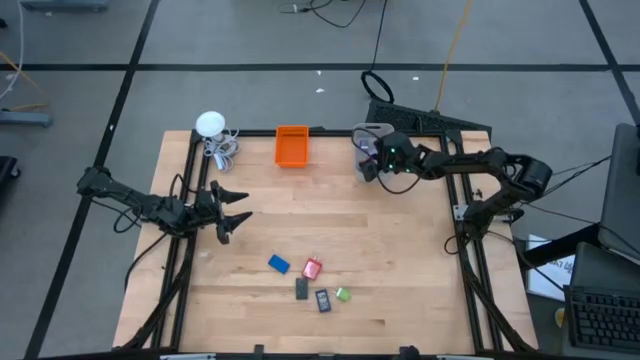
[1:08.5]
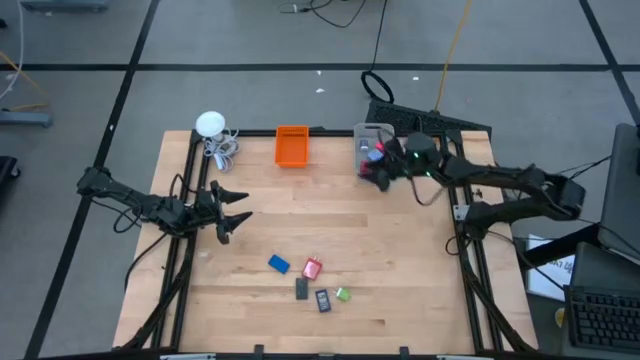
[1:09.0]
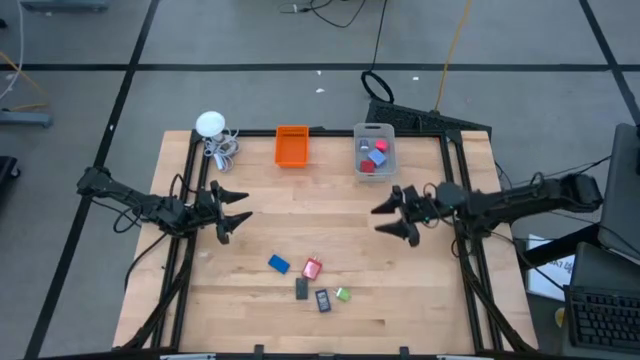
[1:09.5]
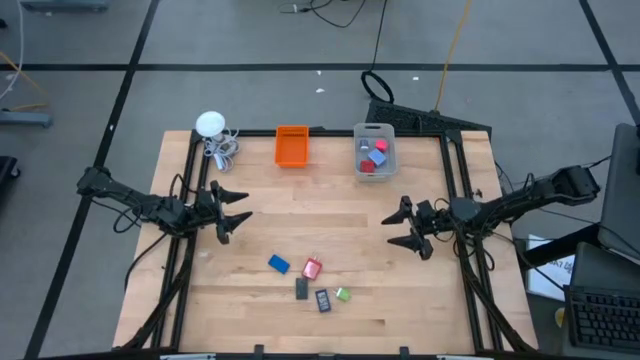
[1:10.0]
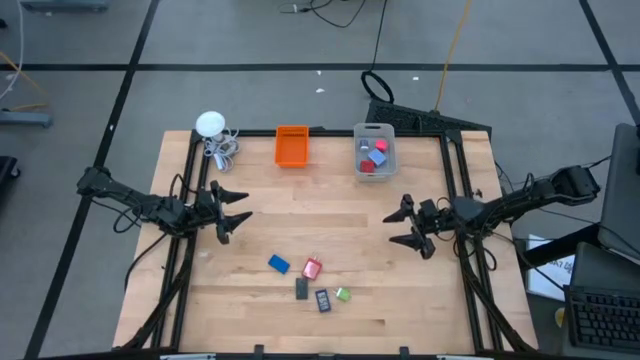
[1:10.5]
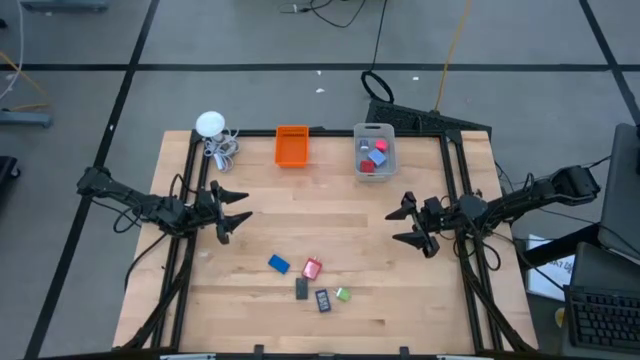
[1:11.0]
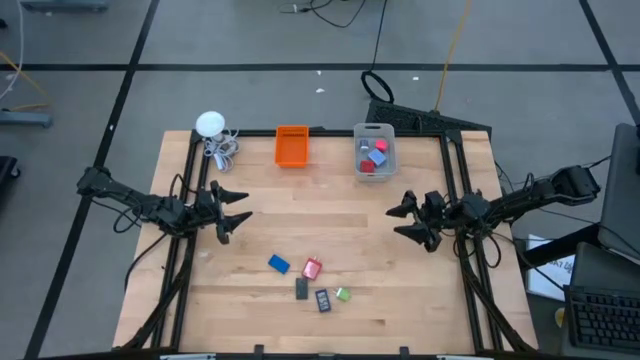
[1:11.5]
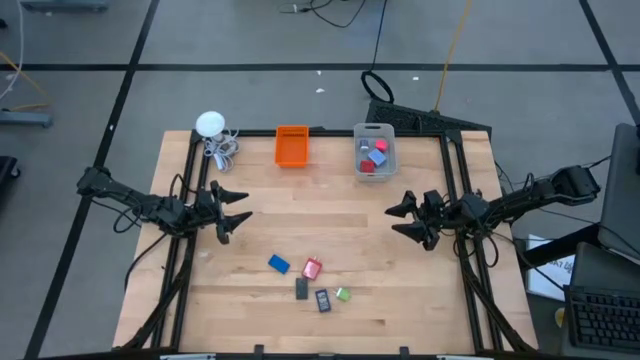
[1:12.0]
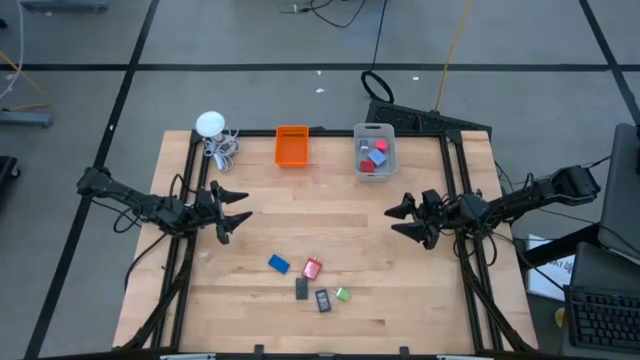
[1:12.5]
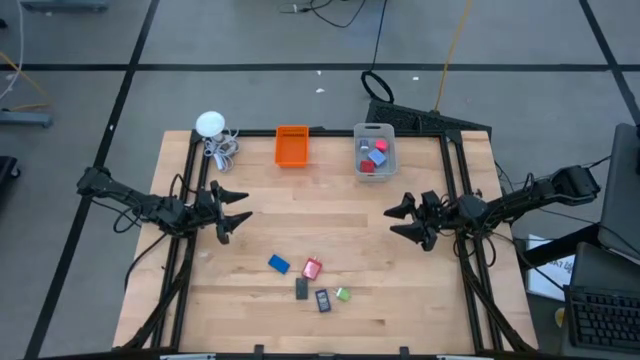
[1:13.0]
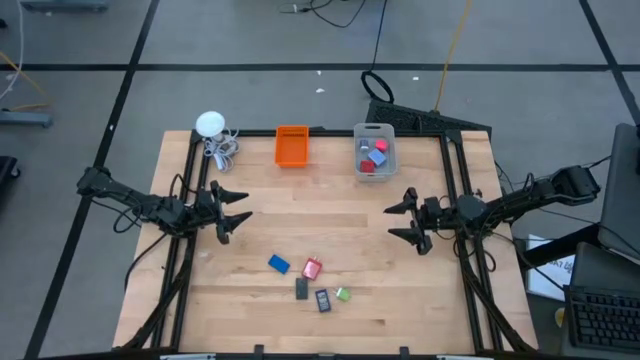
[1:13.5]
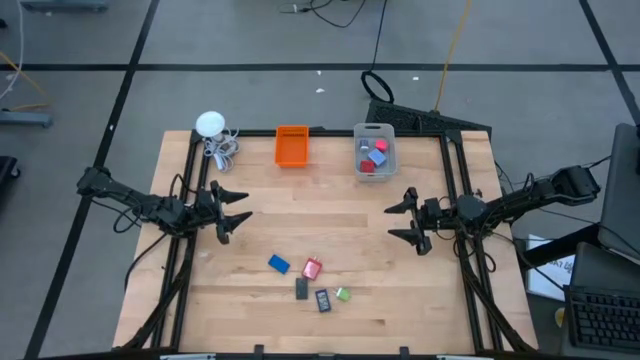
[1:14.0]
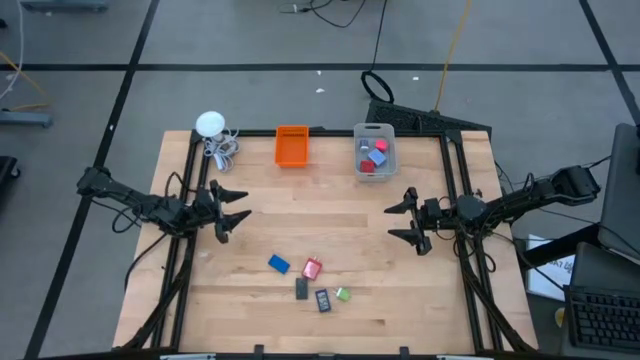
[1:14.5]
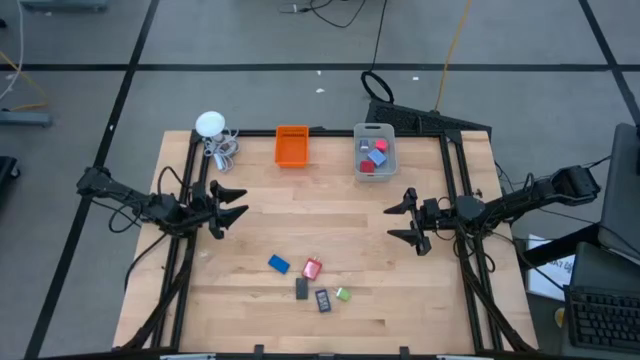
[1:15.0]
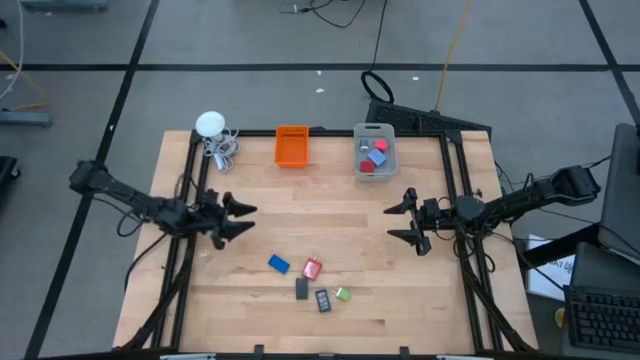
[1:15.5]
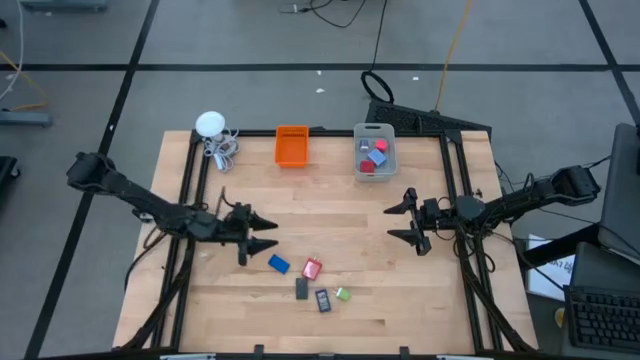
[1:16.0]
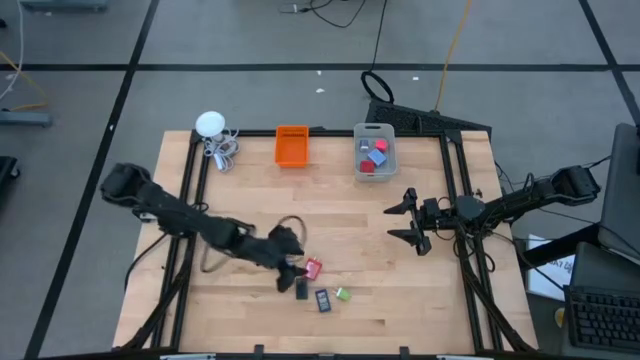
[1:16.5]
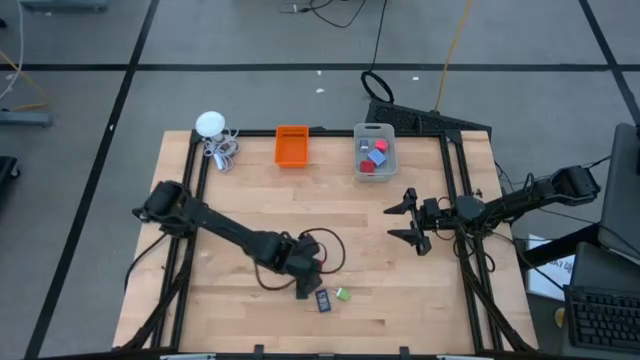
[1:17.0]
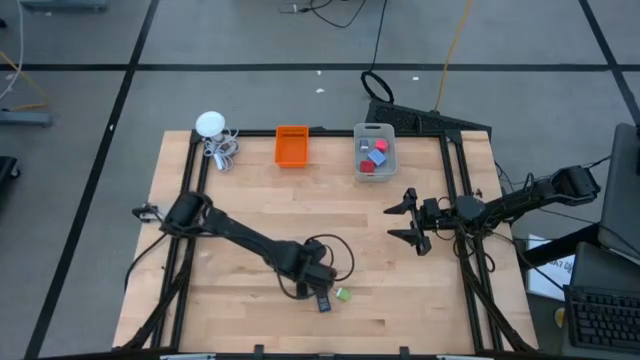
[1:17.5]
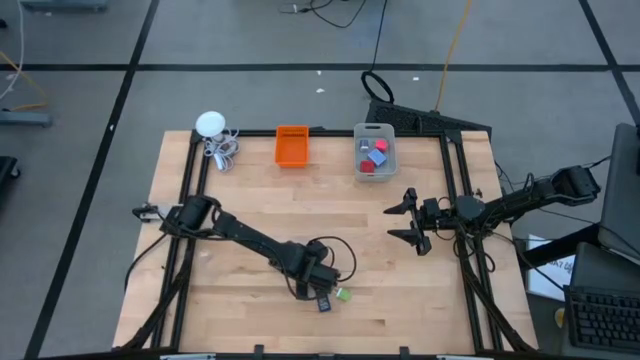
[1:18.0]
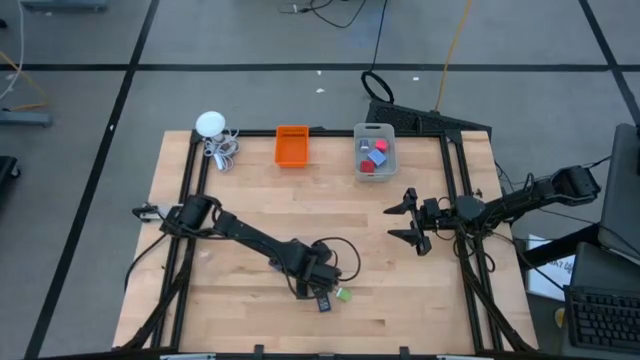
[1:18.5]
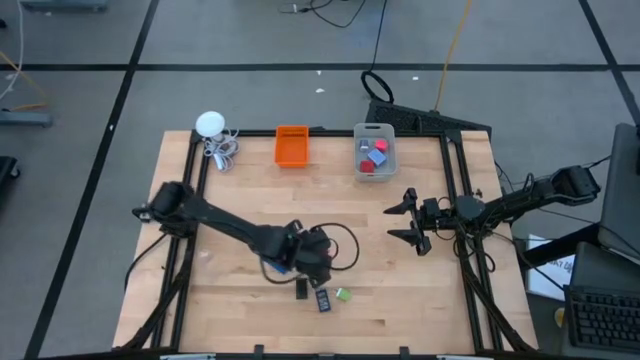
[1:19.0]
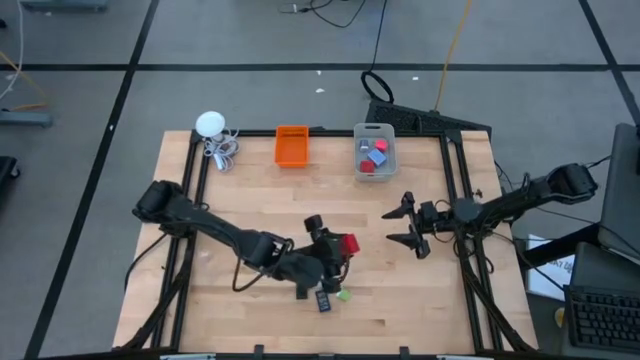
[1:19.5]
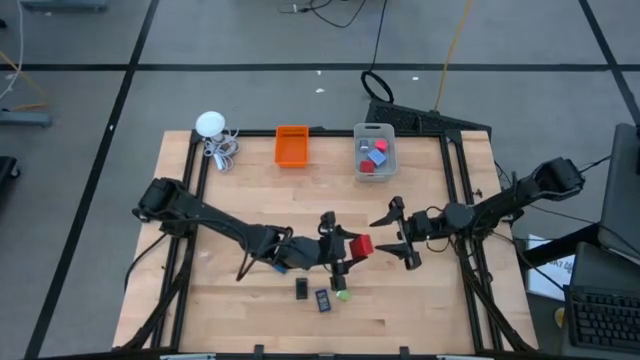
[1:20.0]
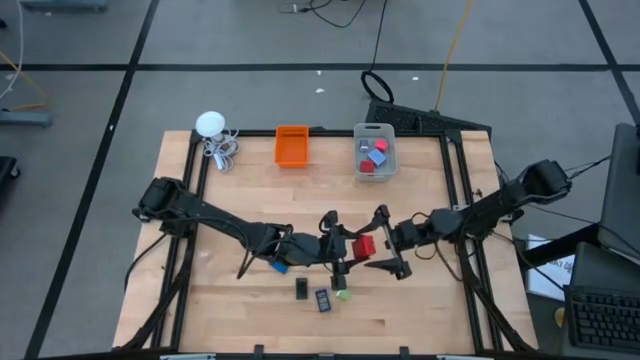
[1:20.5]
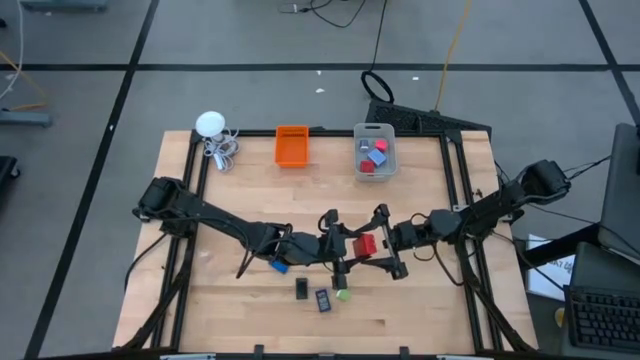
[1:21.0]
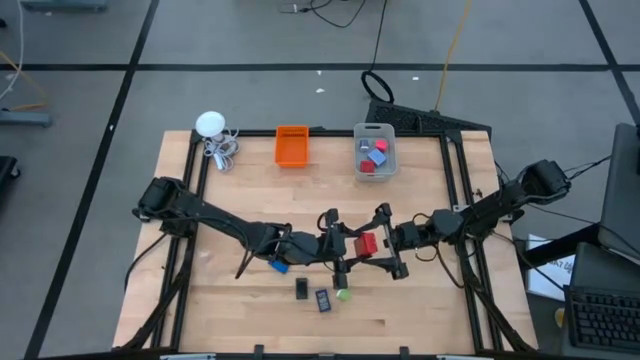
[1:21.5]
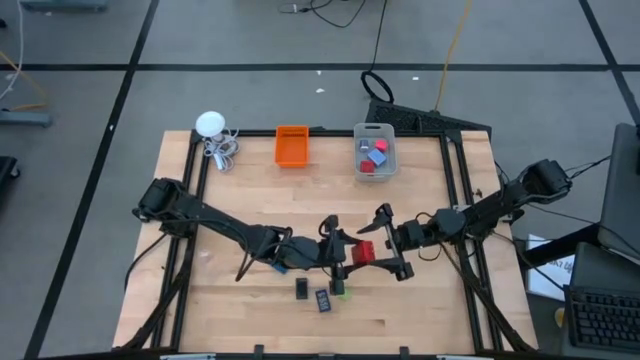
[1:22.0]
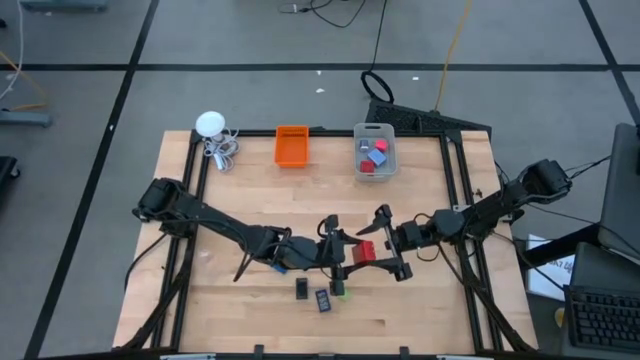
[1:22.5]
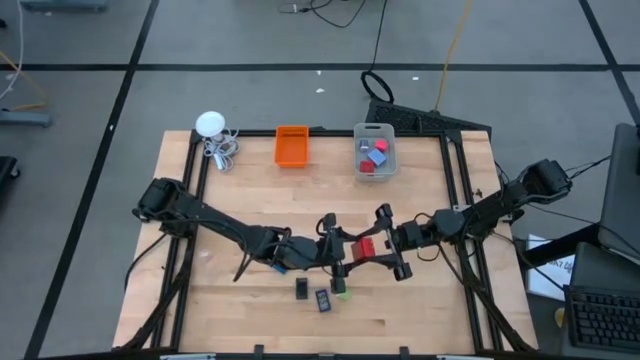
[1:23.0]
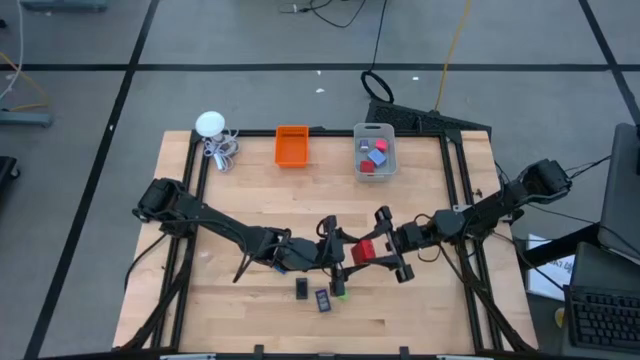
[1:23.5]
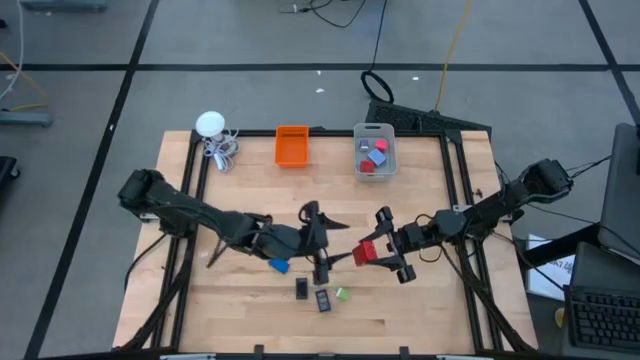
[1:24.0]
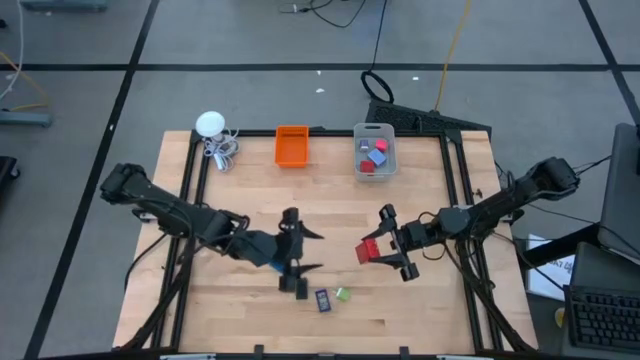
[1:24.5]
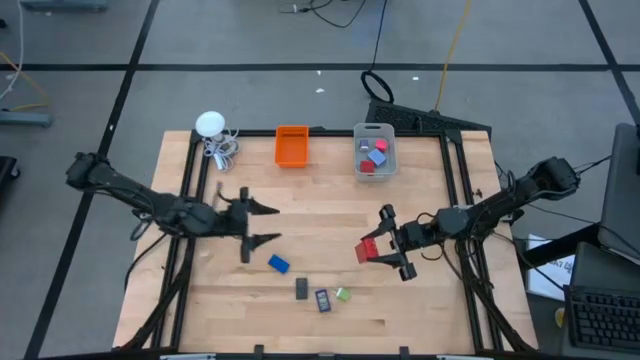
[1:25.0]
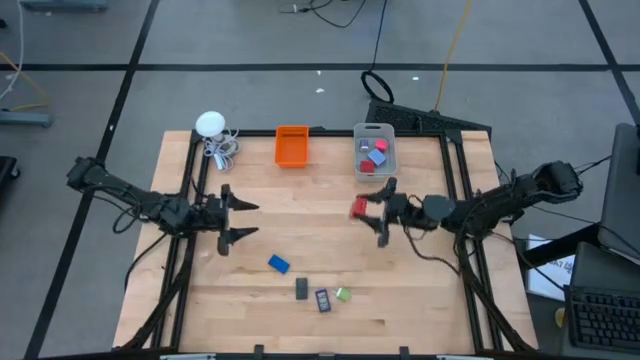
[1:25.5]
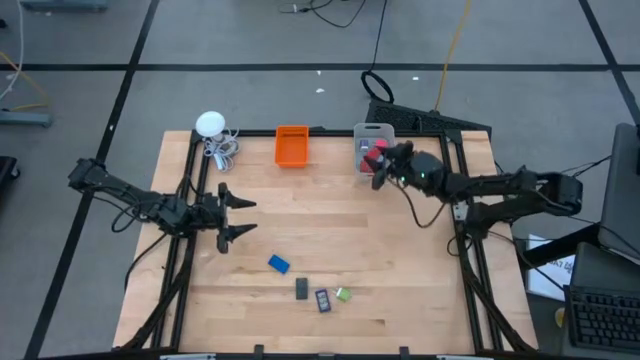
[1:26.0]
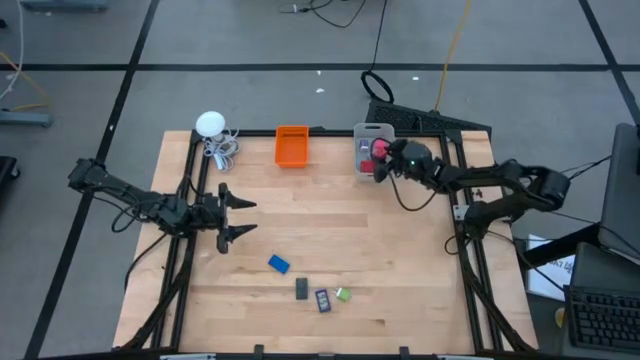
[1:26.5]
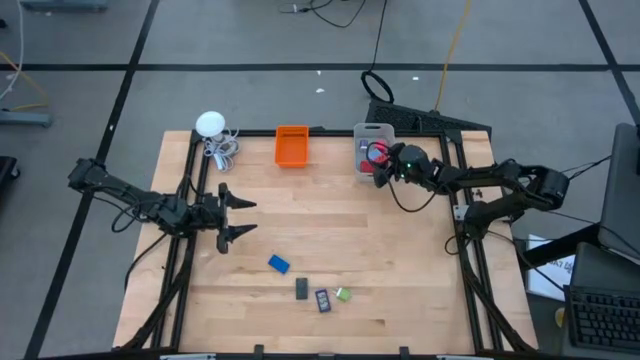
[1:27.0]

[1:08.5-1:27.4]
Task: Pick & Place Office items
Put the red charger adapter into the gray bin

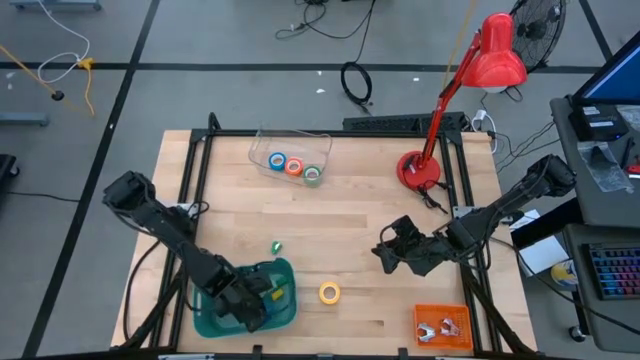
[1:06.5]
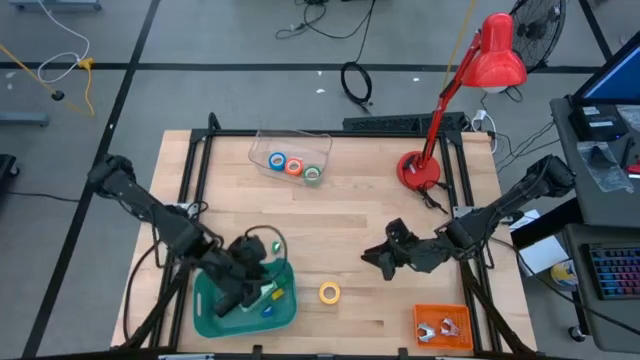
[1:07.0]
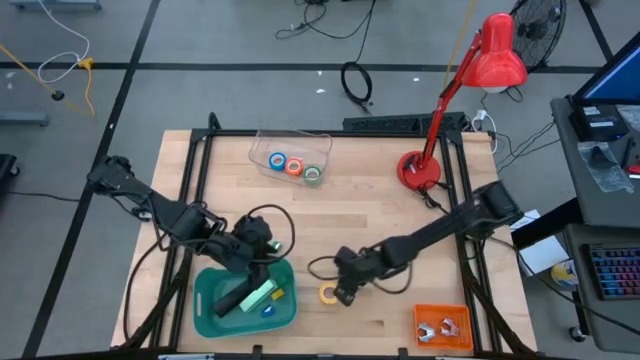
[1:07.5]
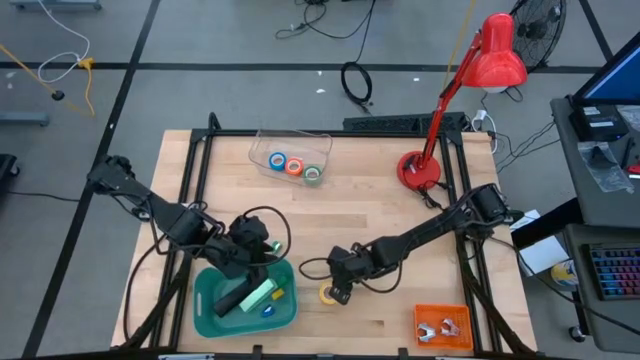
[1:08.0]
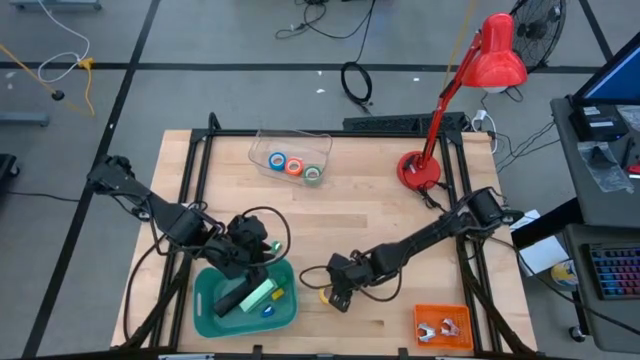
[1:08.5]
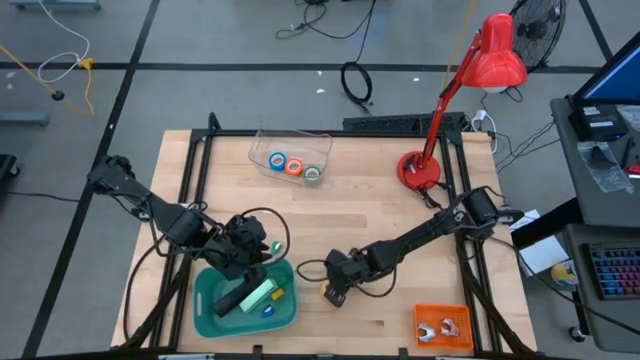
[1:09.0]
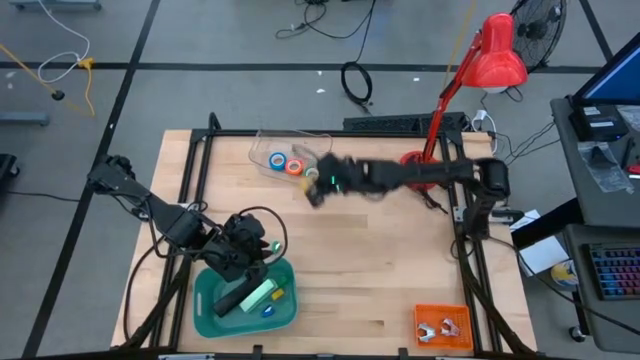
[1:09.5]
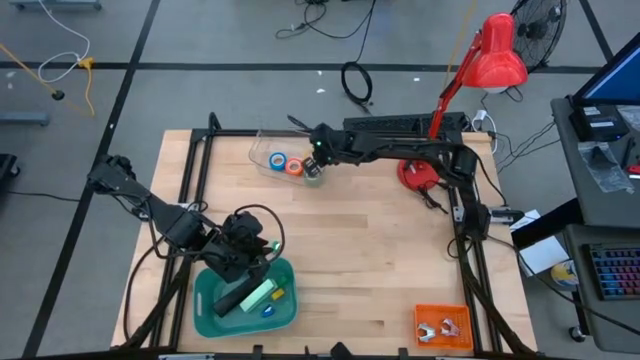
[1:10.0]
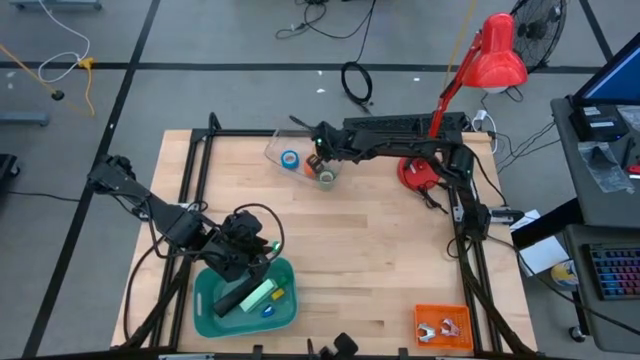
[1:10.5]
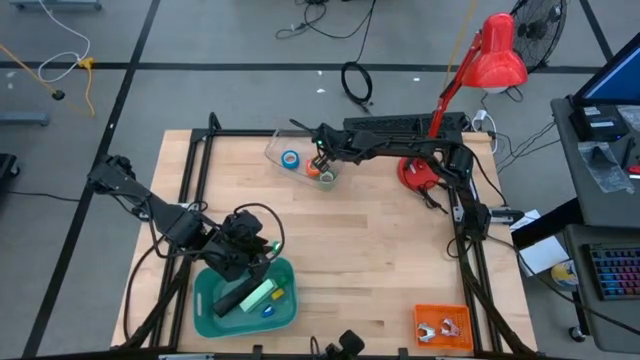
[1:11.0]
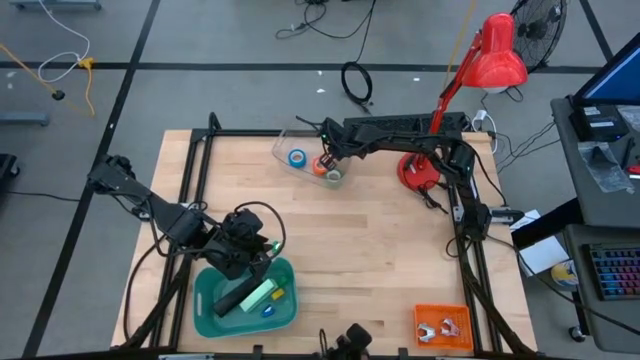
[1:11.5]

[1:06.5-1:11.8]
Task: Pick and place Stapler, Stapler remover, tape
Put the yellow tape into the transparent bin
